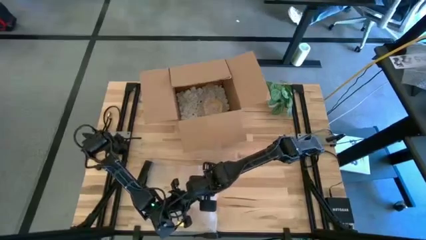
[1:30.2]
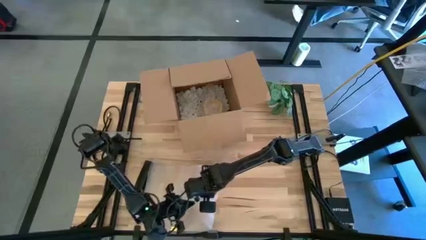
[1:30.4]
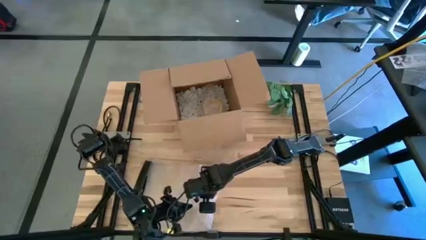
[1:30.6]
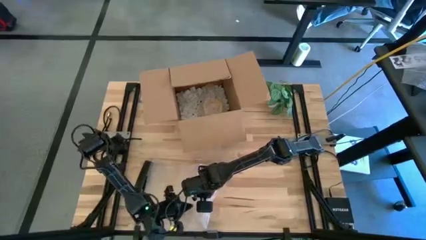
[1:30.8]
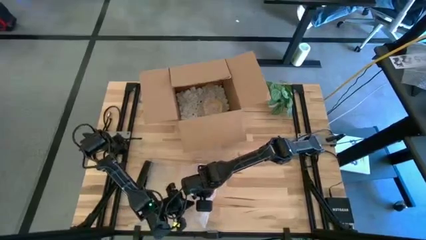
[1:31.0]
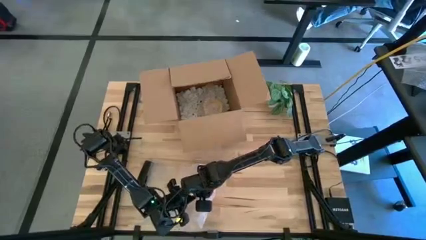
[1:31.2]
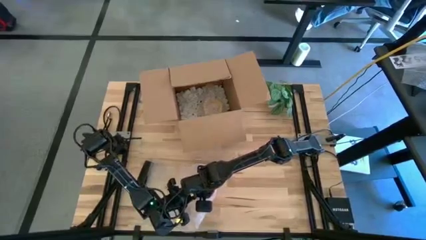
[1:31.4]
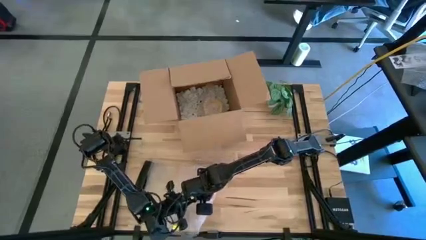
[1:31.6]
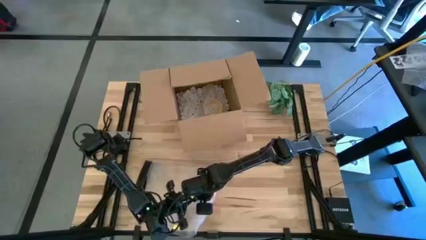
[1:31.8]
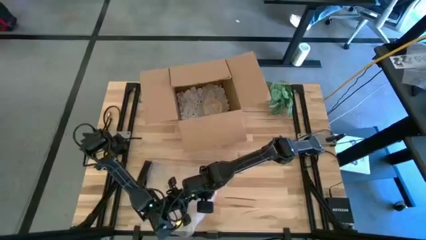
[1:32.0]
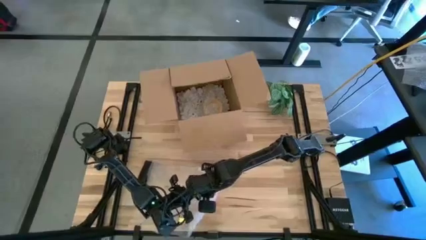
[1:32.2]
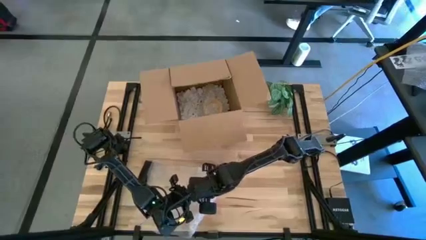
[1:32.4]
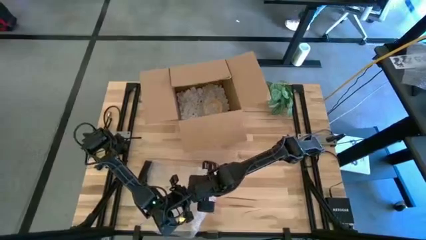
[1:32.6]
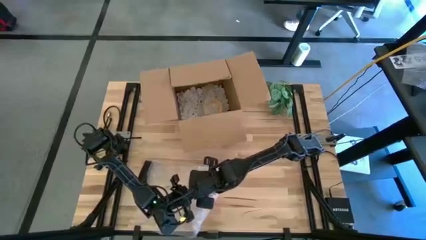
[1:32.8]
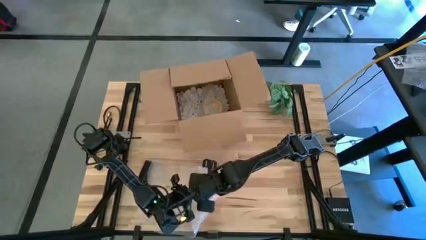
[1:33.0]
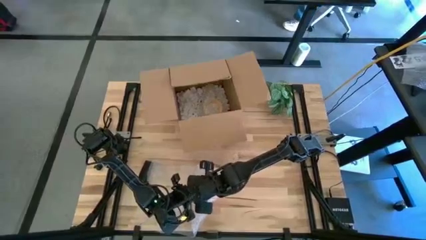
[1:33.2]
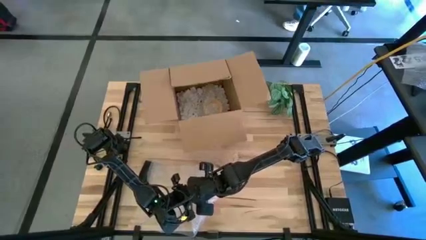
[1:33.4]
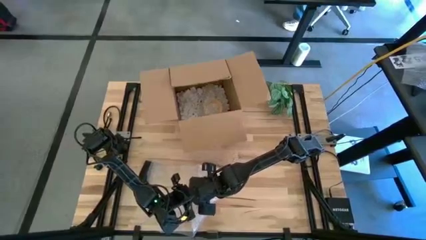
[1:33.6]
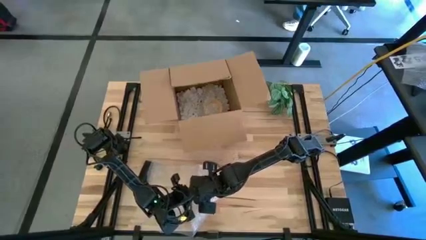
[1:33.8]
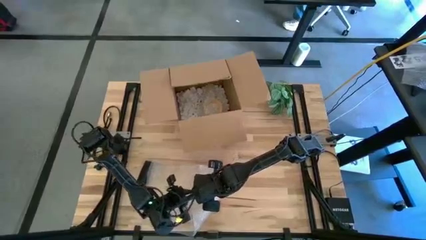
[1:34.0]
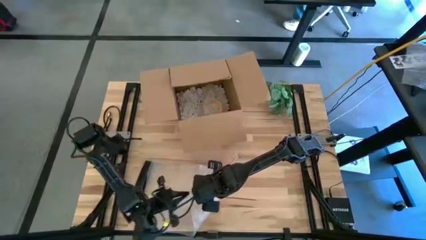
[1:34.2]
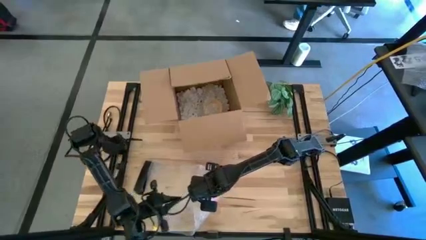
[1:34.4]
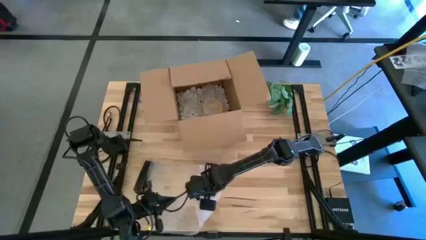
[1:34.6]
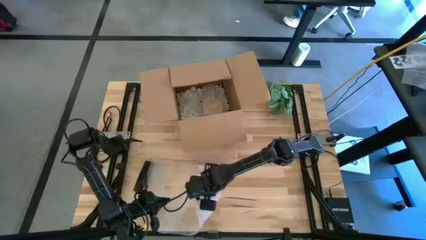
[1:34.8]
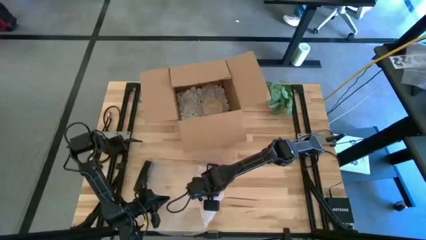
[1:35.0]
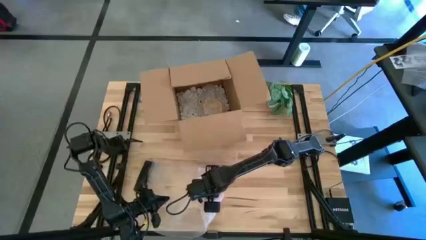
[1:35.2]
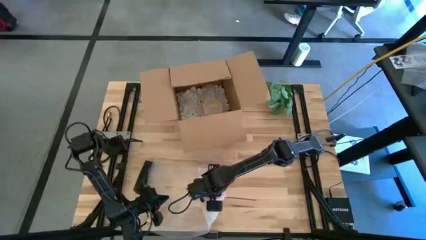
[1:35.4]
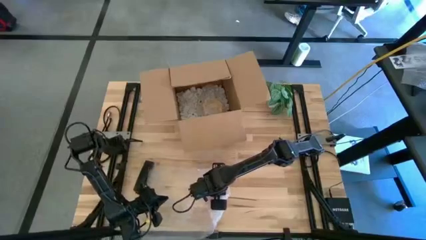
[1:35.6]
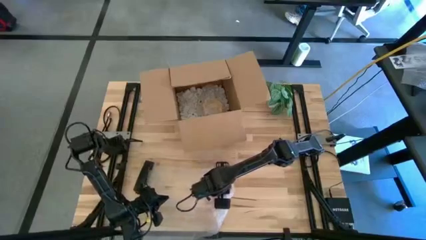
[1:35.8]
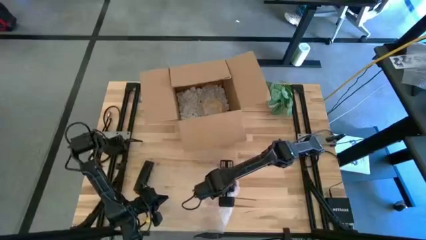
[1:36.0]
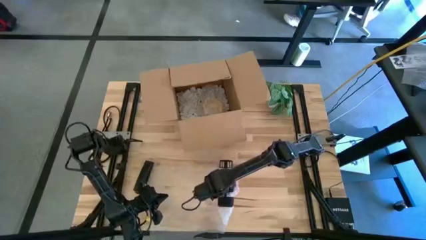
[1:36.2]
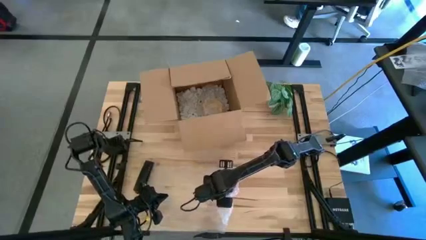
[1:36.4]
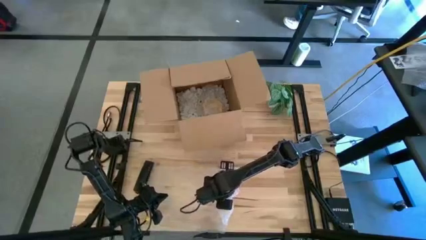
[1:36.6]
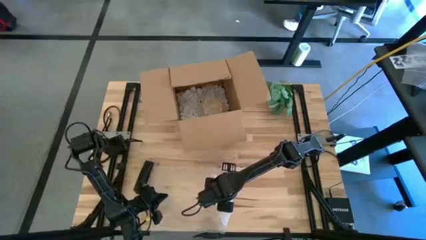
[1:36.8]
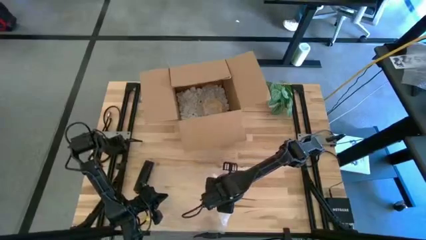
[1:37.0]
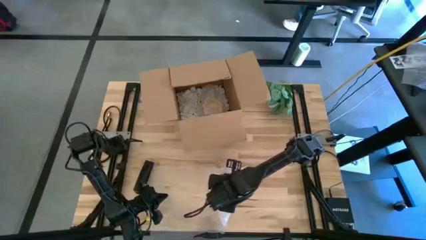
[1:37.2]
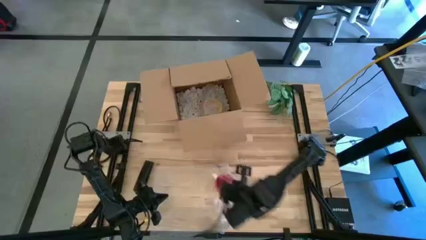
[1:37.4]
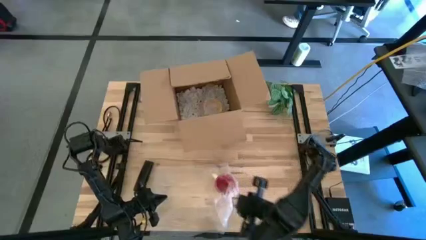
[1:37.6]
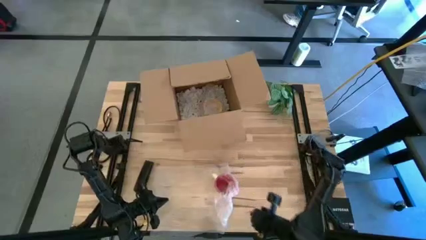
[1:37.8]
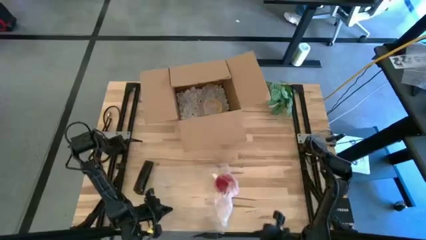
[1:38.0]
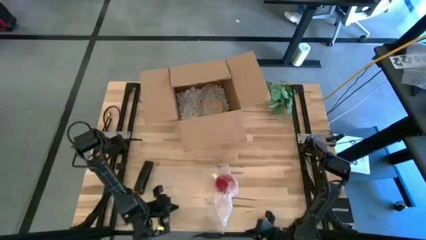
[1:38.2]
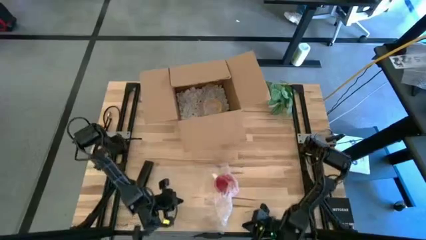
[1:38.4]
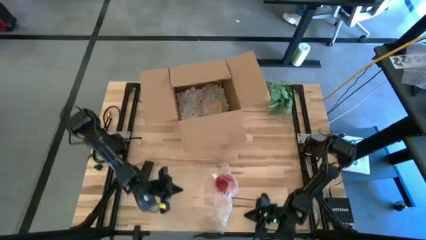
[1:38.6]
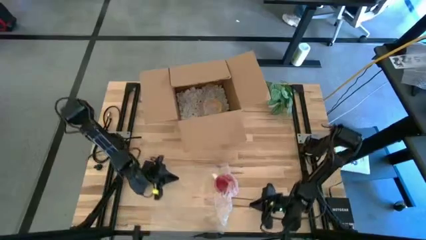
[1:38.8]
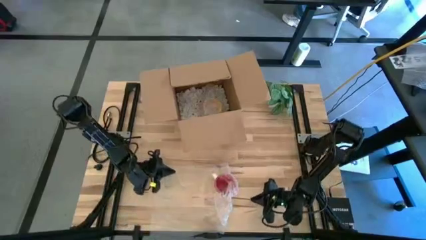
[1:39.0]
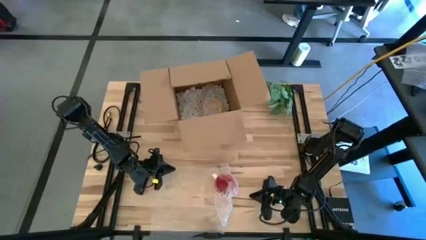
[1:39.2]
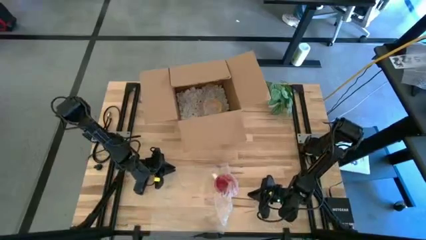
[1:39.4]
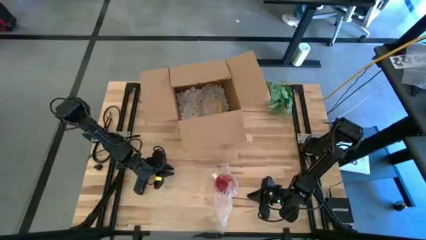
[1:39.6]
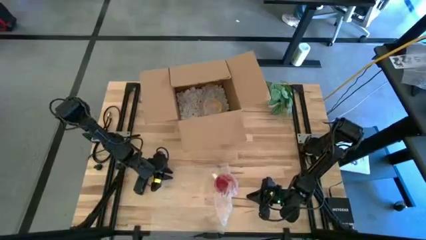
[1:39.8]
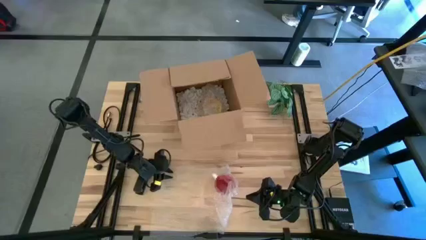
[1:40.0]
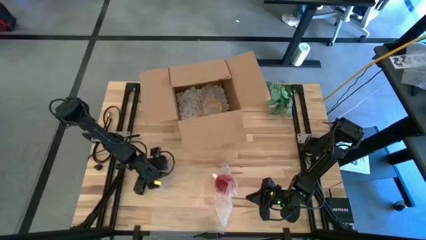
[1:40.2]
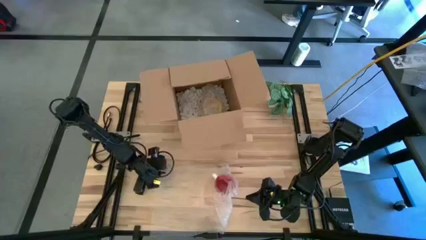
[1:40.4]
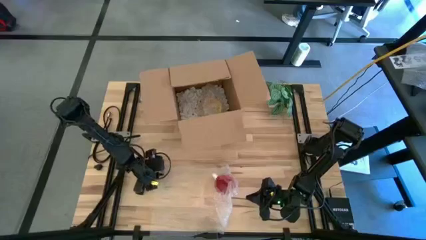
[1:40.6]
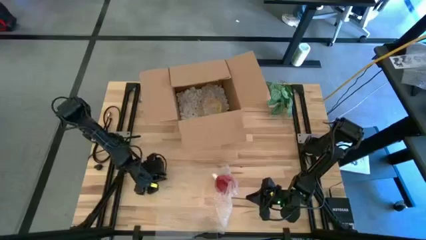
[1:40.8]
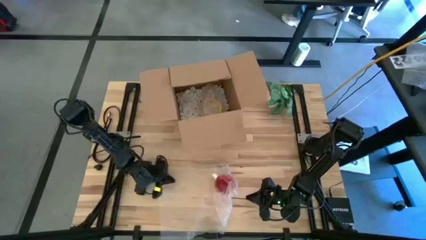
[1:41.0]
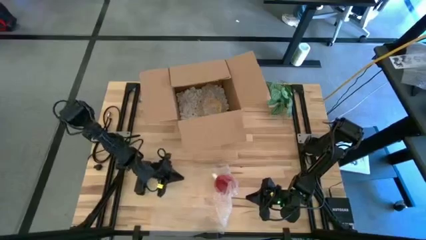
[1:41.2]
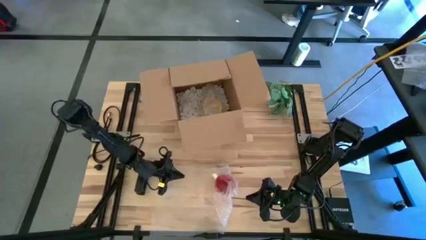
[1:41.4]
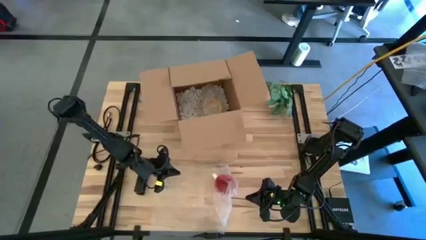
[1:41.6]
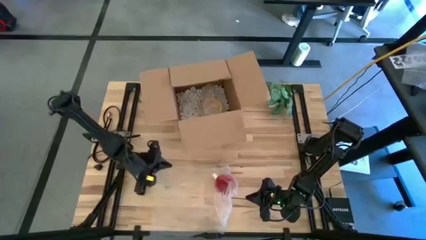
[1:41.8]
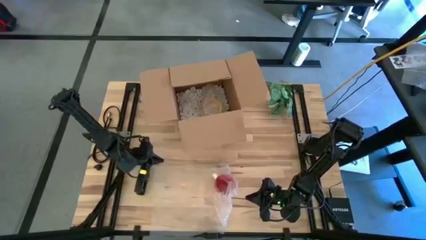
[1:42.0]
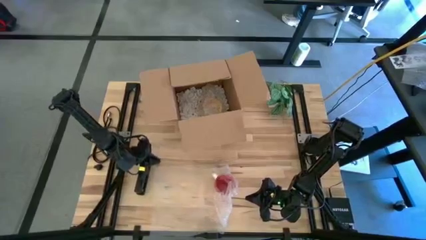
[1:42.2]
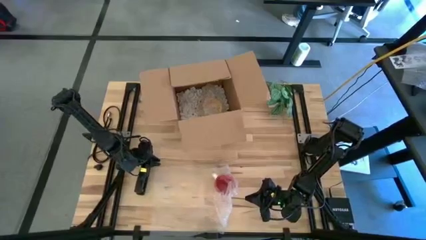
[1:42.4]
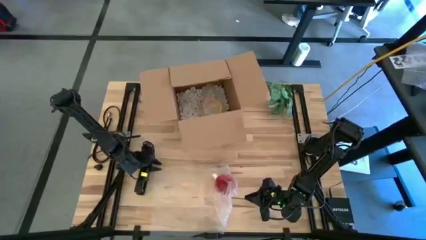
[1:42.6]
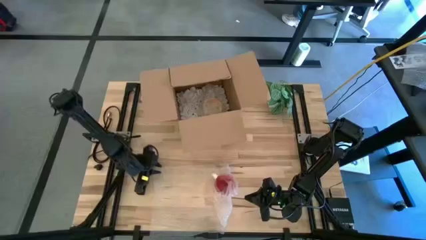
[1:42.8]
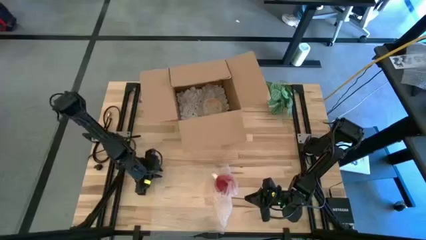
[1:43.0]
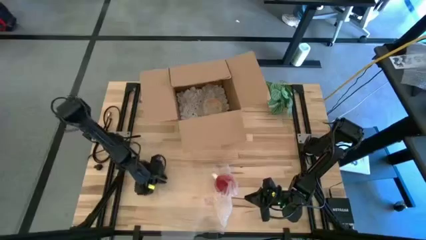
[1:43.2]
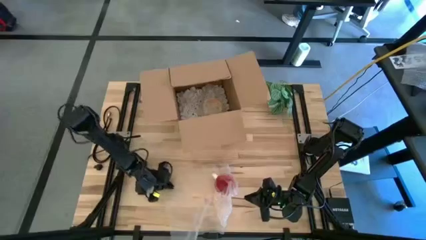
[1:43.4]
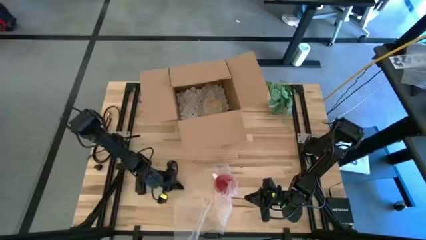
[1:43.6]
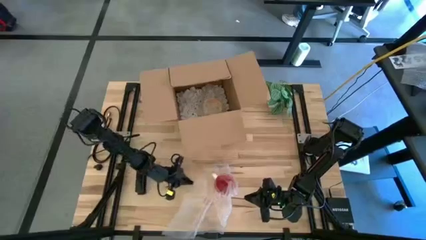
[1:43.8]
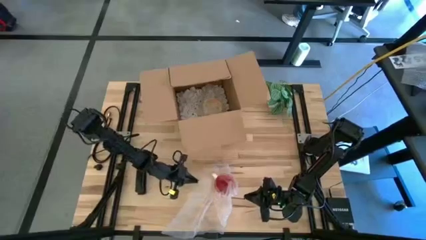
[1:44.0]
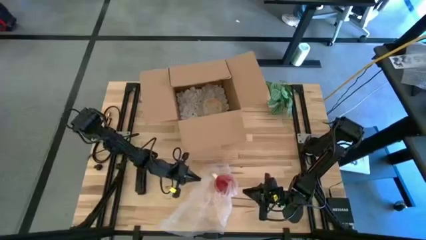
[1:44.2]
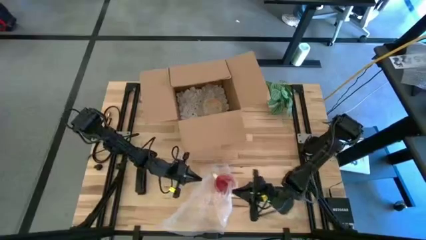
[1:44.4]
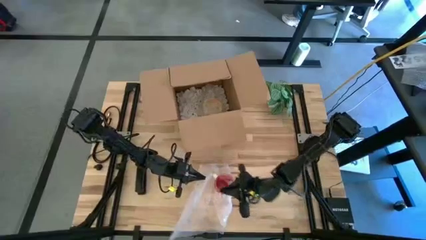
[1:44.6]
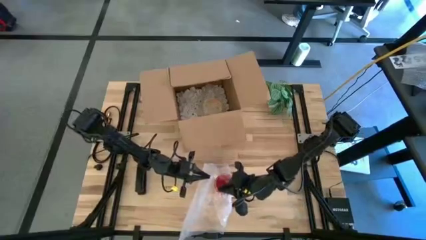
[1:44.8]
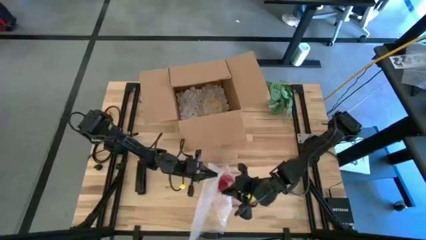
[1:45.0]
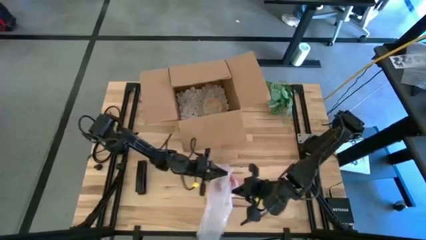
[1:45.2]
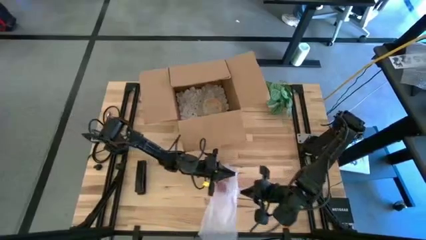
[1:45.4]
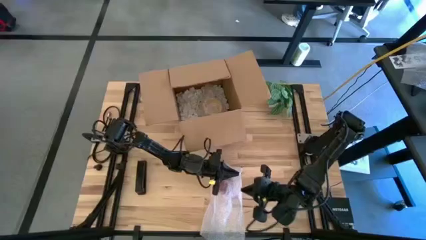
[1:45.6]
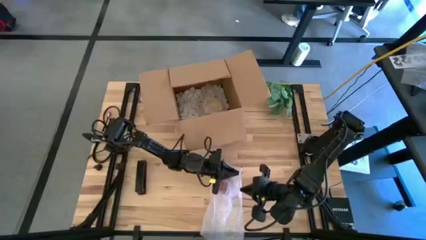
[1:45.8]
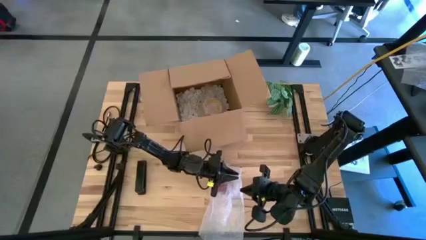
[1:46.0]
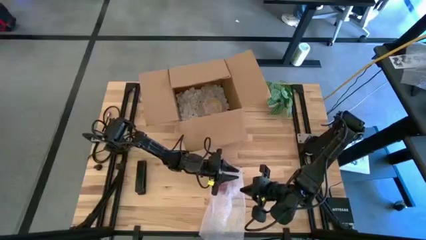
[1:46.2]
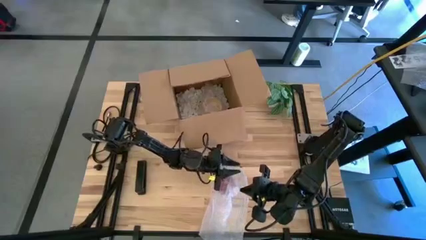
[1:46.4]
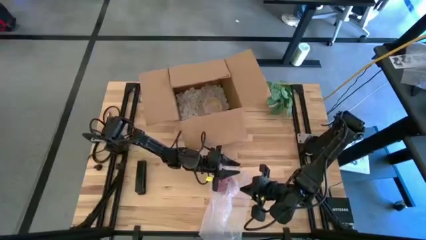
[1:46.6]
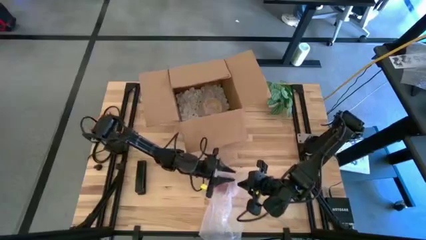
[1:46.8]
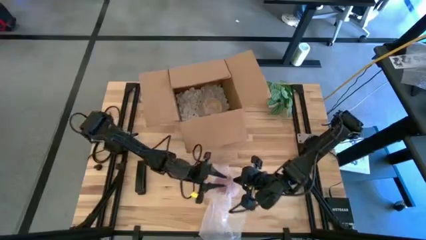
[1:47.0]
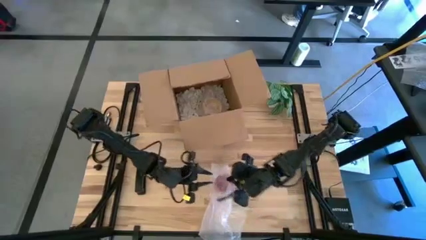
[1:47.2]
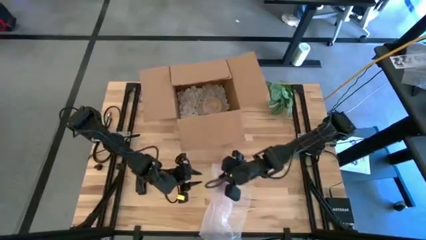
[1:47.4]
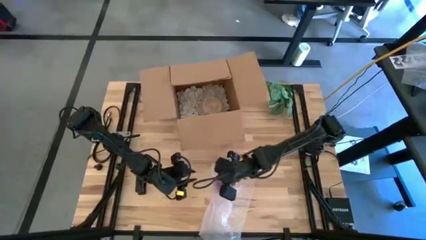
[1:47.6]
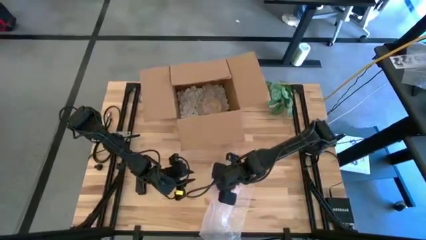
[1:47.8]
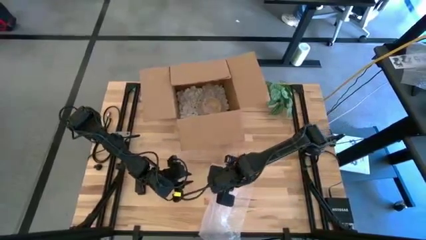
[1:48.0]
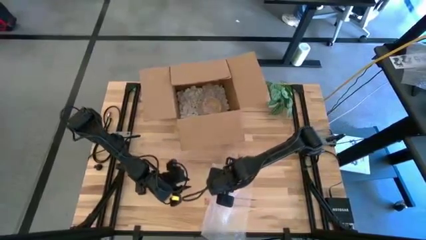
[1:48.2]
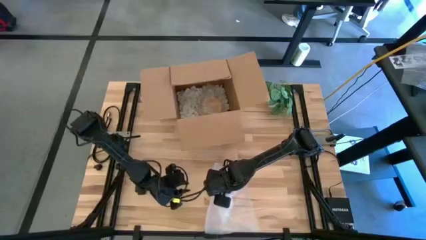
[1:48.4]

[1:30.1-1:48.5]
Task: wrap mug
Wrap the red mug with bubble wrap
